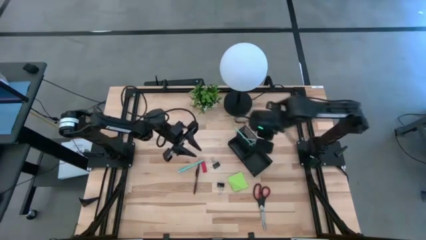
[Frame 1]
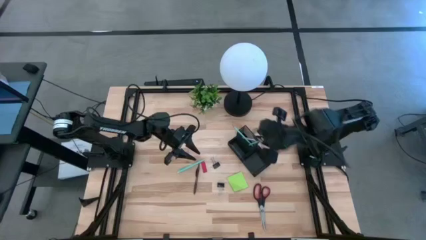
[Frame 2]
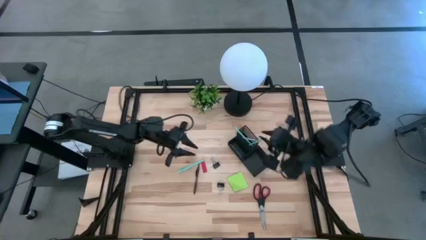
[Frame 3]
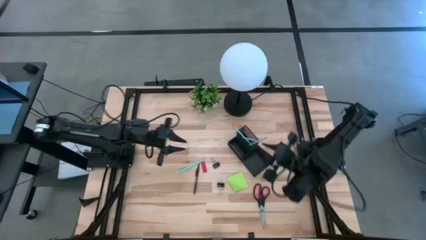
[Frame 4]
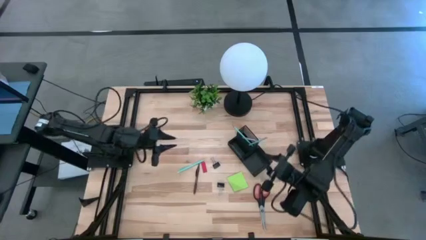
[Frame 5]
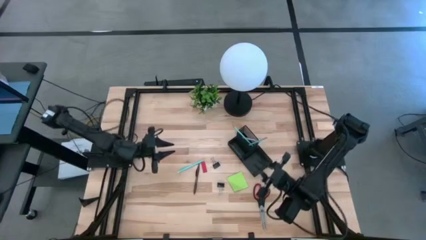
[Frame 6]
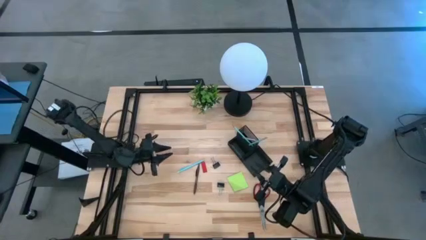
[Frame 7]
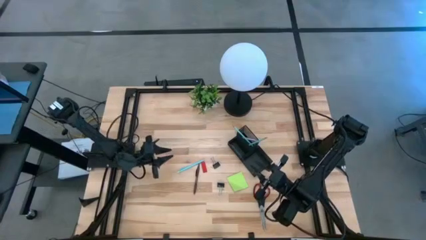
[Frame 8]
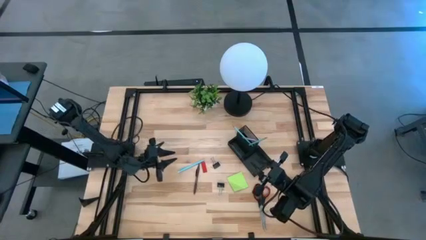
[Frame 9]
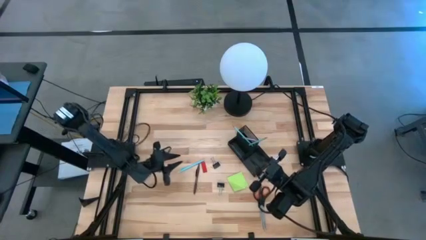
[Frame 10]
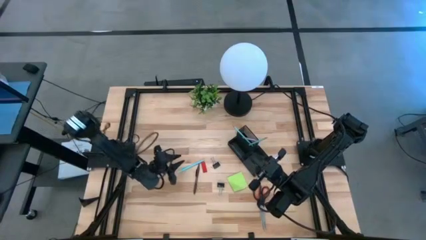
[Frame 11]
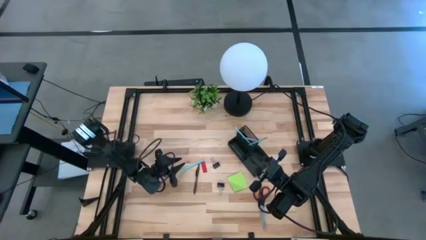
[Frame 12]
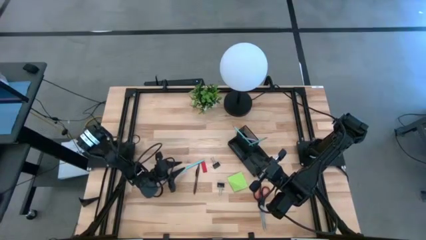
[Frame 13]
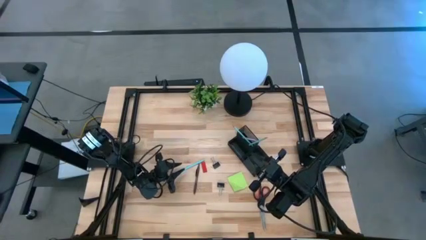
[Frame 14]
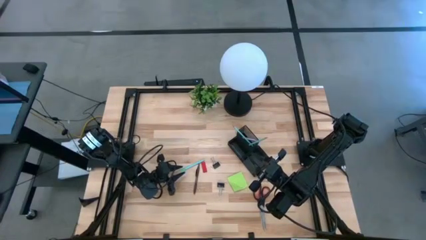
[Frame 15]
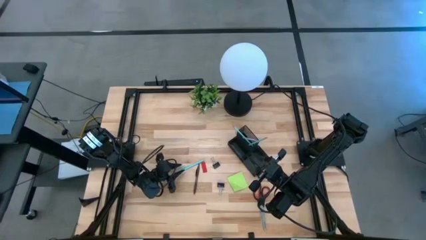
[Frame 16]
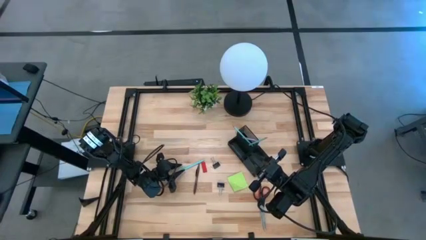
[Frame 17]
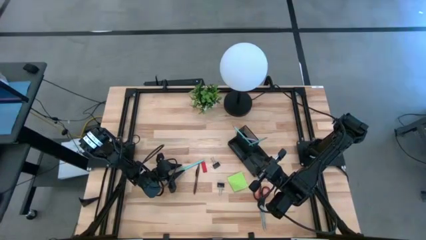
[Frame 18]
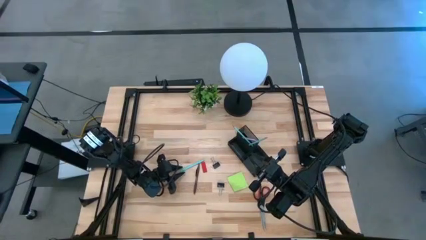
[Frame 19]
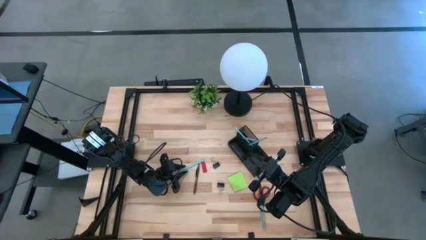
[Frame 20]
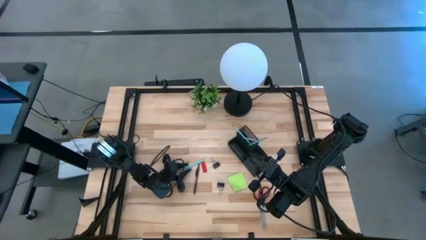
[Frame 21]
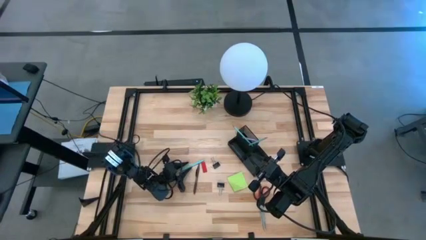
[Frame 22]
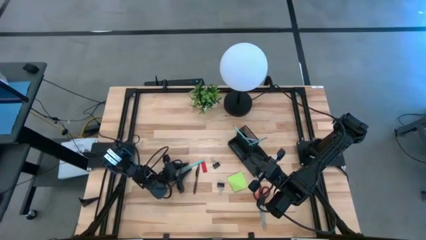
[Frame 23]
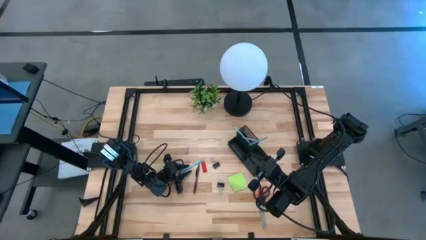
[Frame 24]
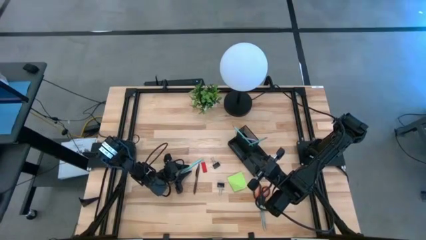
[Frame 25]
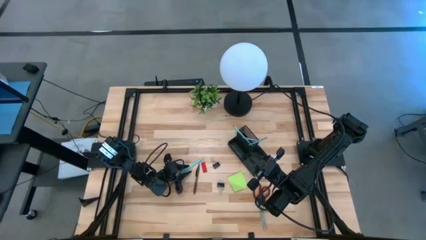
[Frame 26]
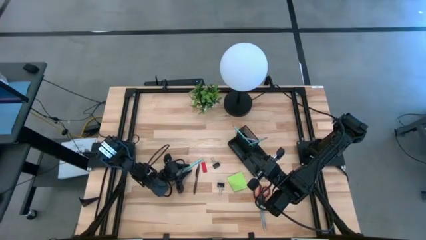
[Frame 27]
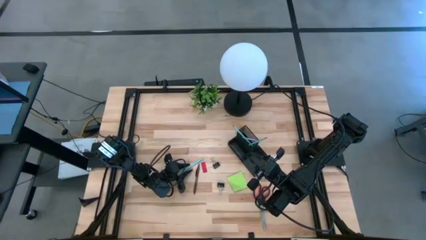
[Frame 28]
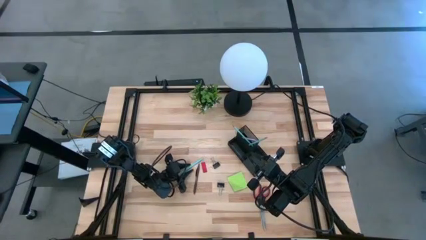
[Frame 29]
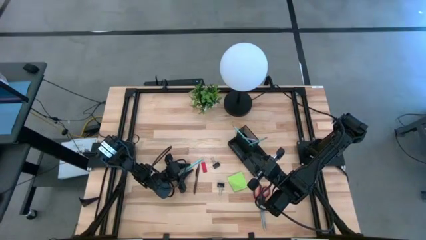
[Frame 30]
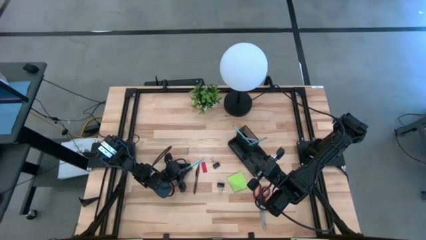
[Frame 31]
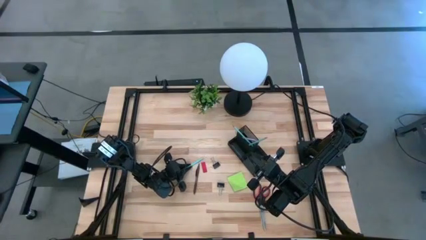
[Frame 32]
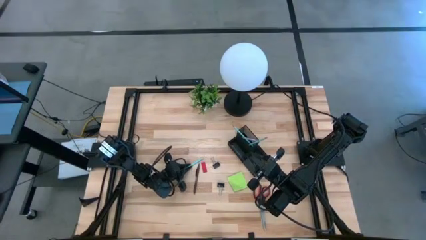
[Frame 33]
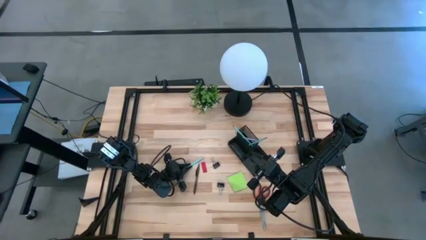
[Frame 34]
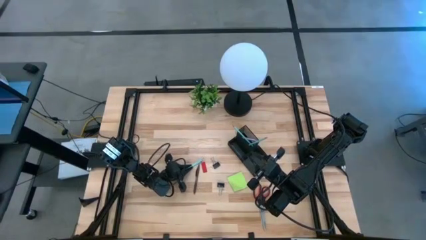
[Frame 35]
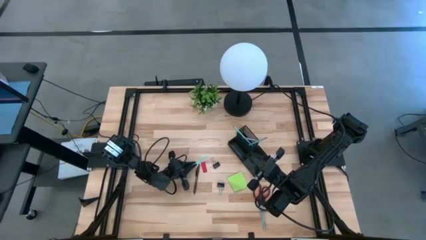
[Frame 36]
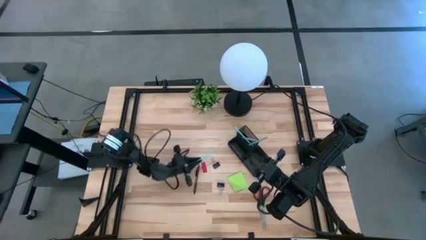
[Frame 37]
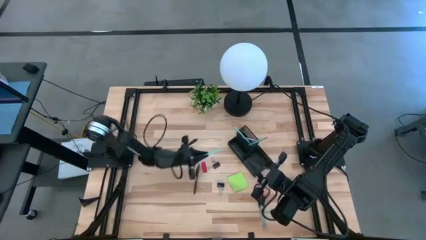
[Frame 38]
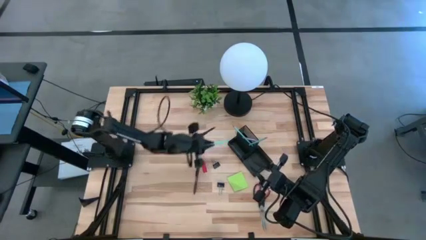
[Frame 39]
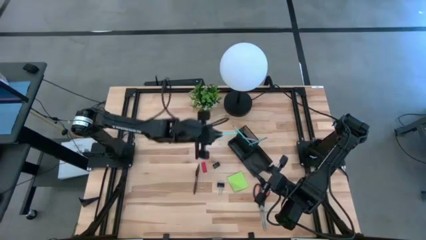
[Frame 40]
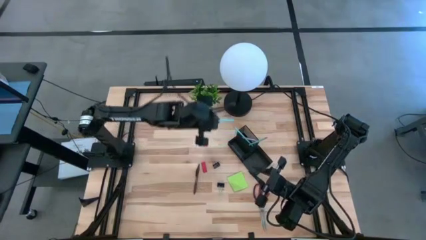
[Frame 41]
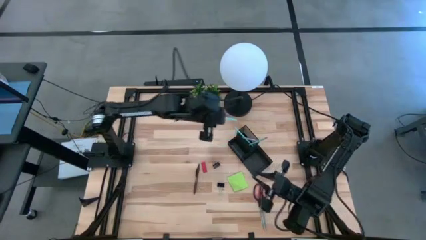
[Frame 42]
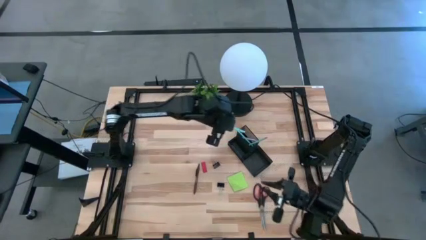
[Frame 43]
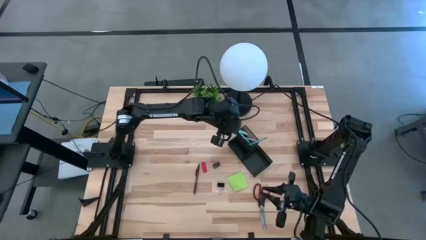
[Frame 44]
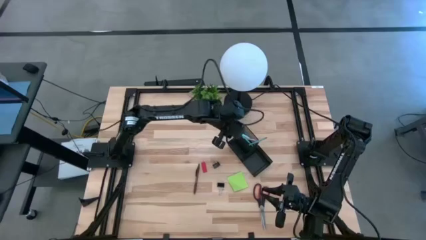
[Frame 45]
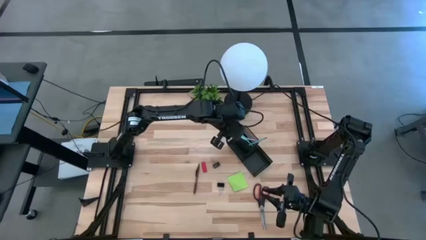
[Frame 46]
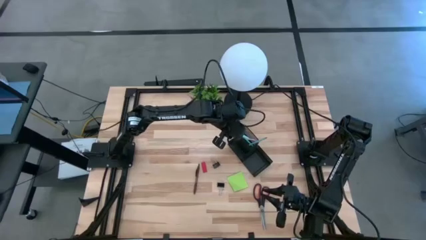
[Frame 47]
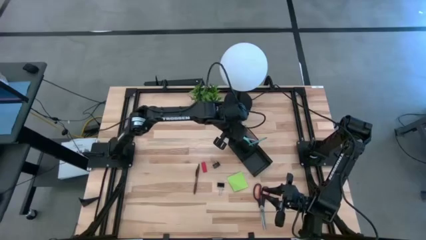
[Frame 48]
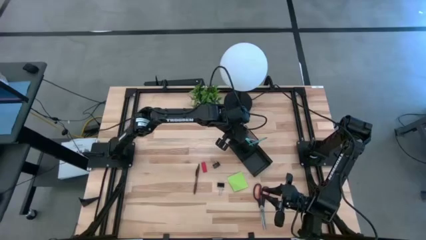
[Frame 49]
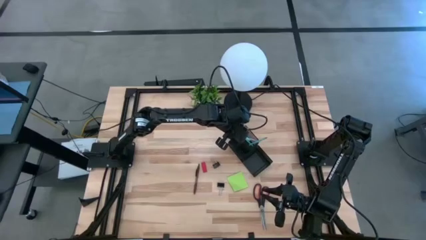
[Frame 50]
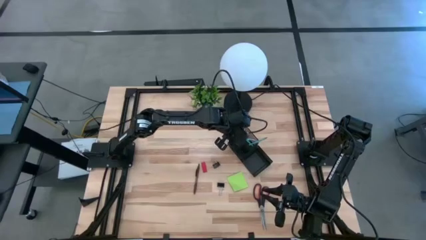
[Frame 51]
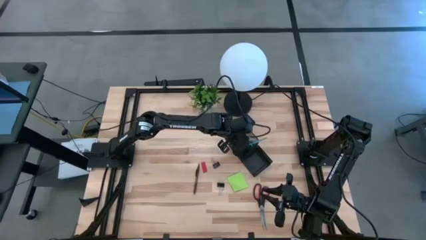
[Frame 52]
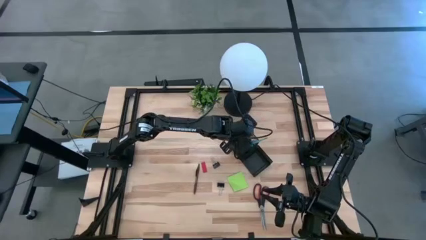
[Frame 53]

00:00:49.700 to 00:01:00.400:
Task: Pick and place office supplies into organizer
Put the light blue pen into the desk organizer
